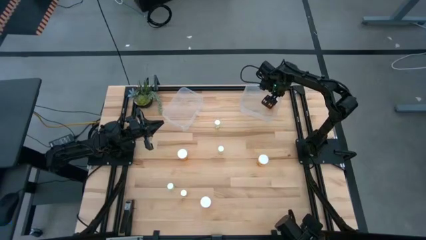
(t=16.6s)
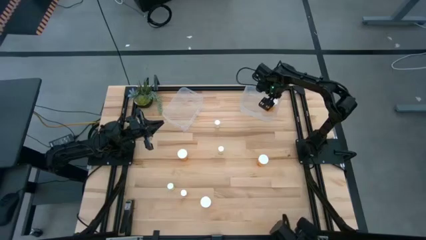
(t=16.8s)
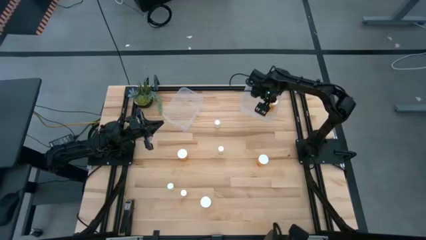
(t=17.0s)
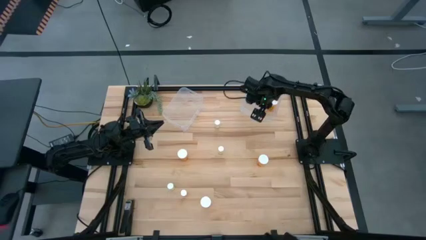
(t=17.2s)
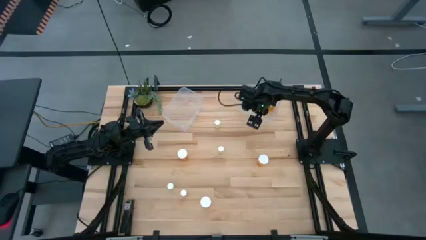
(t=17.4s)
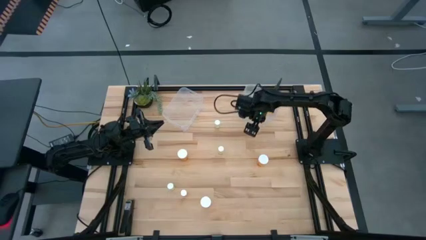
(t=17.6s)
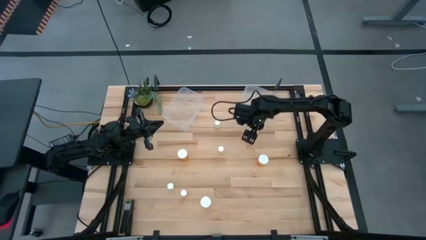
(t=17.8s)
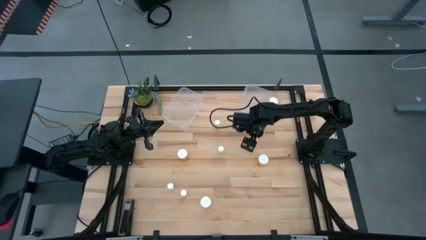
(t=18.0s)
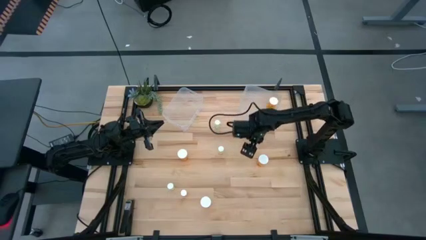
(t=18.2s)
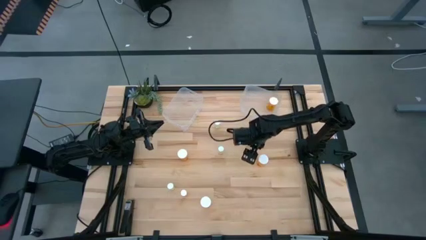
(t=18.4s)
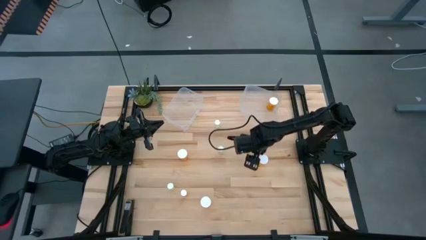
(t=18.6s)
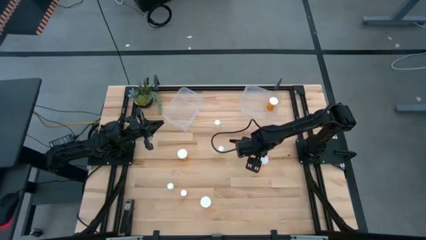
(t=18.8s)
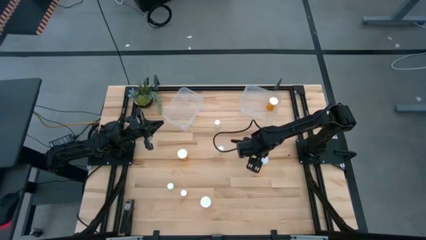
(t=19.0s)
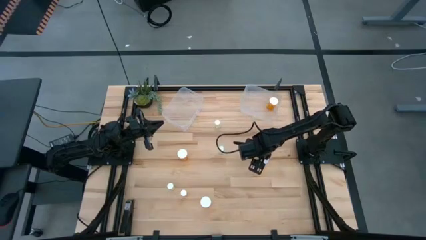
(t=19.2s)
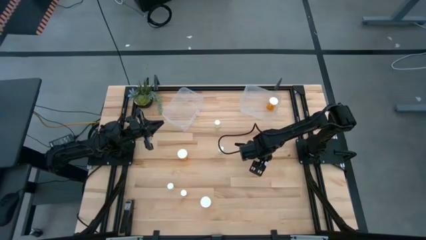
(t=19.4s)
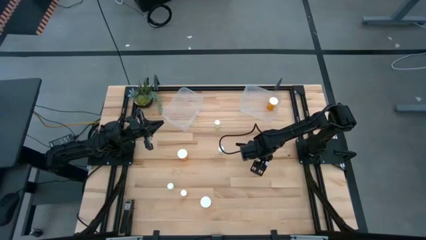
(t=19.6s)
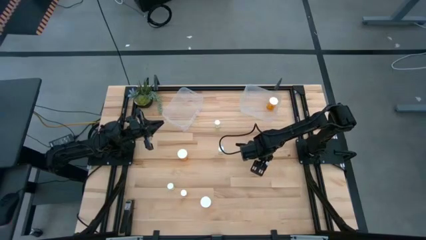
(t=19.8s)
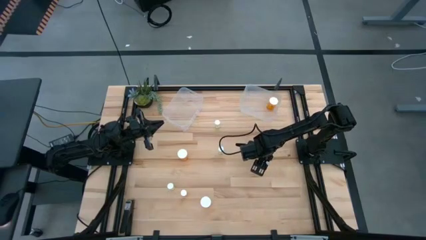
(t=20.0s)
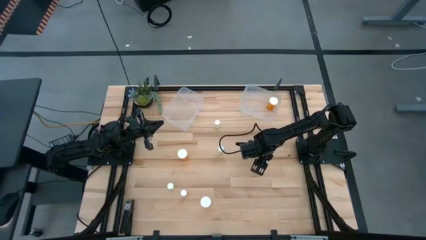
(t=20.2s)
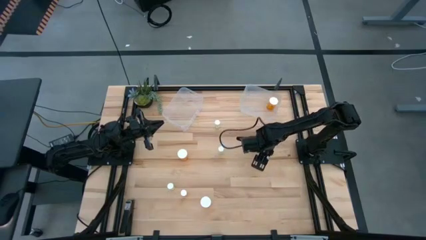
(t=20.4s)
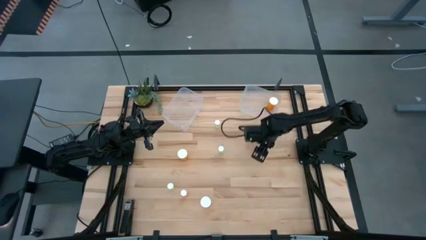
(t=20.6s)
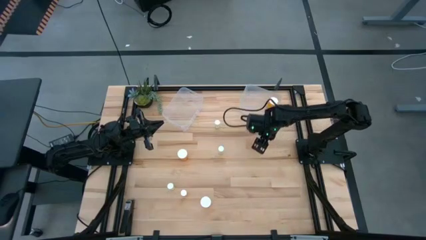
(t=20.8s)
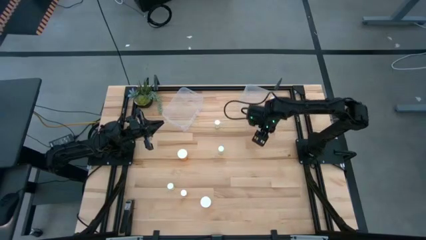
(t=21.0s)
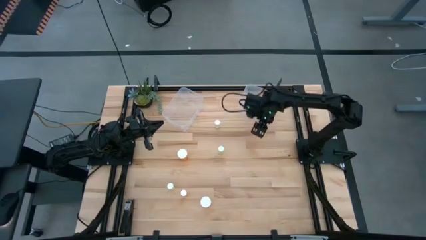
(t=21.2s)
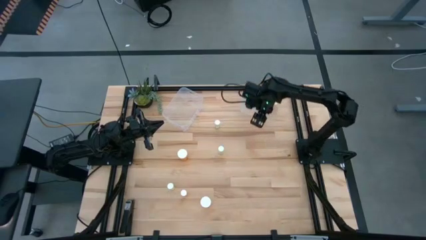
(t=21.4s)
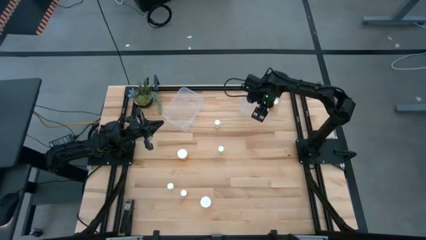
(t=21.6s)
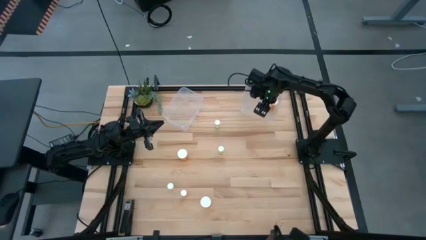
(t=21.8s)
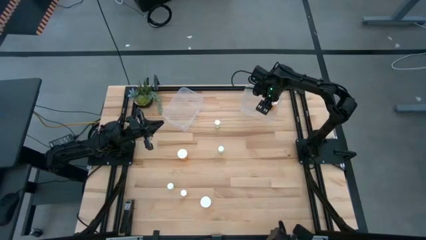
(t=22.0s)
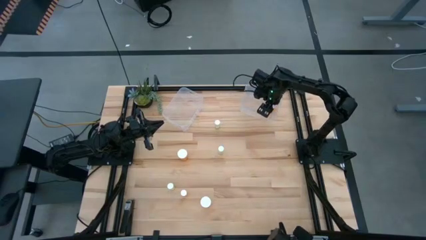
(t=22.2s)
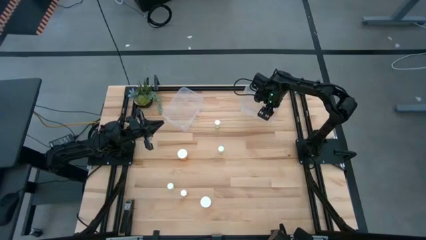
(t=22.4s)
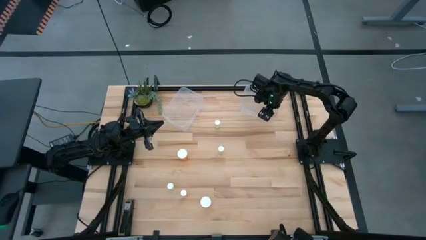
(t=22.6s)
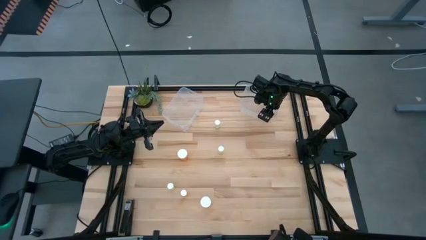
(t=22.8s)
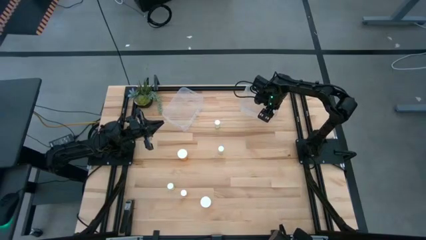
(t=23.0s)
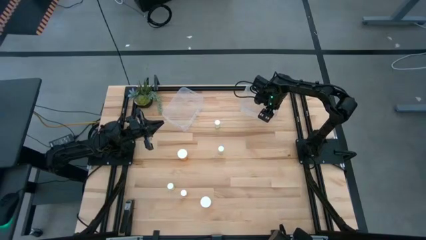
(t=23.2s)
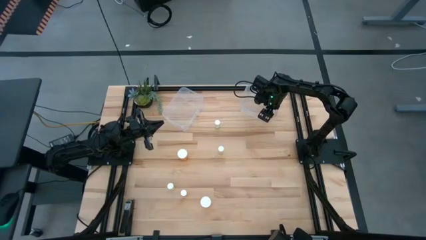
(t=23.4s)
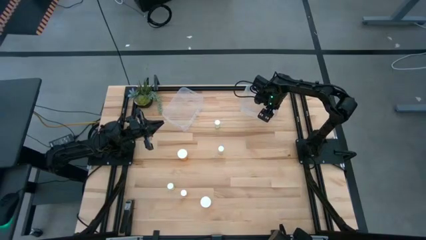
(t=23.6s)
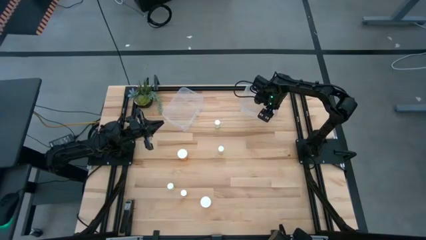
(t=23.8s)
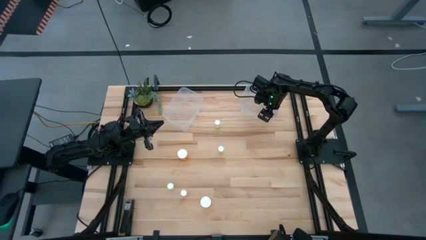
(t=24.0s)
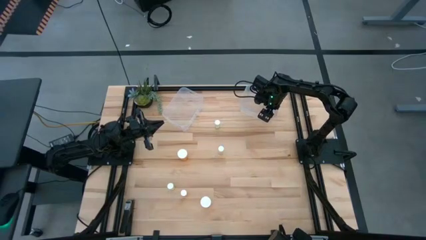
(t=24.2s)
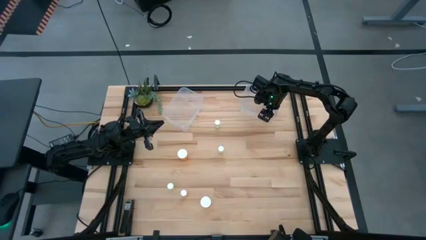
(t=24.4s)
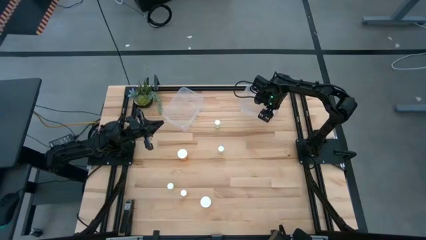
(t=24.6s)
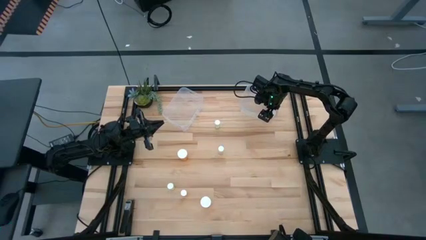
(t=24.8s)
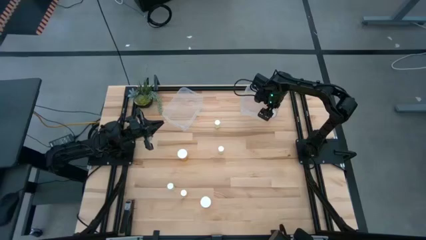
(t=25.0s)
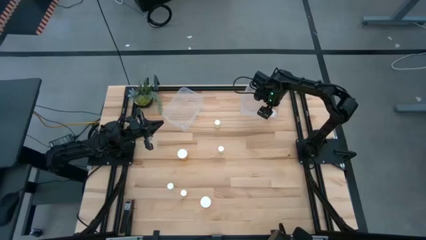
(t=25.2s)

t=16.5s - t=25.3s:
Task: Pick and place medicine bottles into bin by pill shape (circle, oval)
Put the large orange capsule bottle into the right transparent bin
